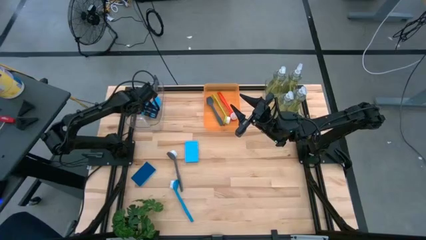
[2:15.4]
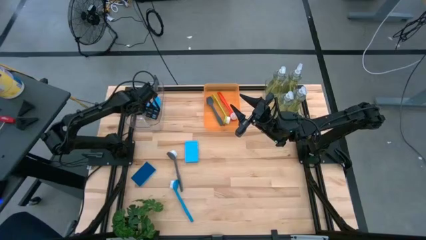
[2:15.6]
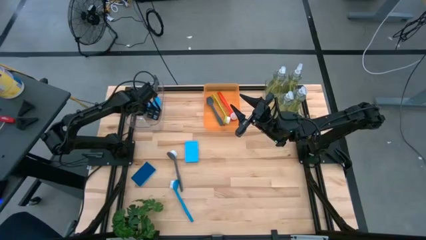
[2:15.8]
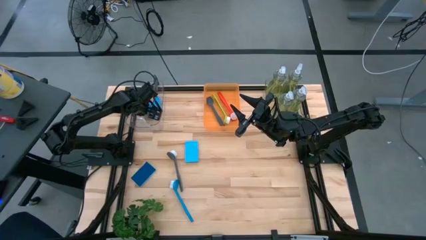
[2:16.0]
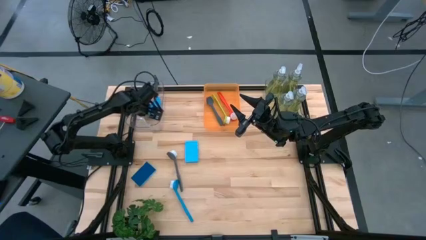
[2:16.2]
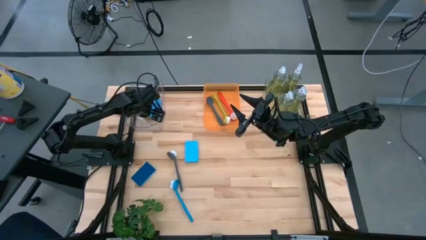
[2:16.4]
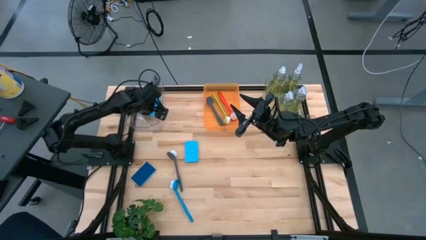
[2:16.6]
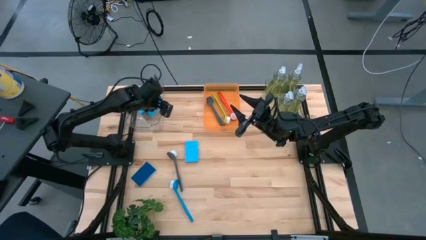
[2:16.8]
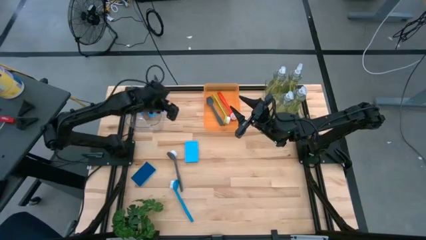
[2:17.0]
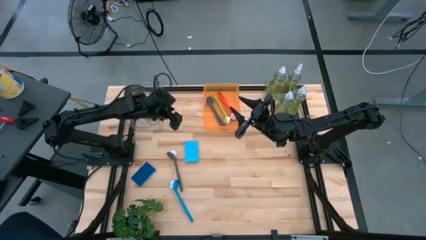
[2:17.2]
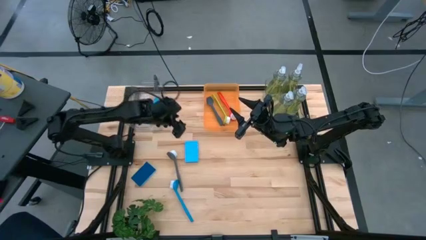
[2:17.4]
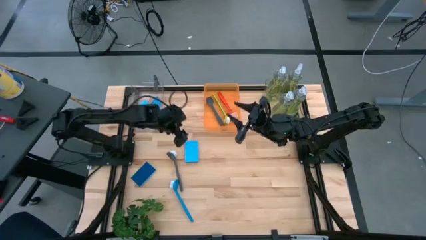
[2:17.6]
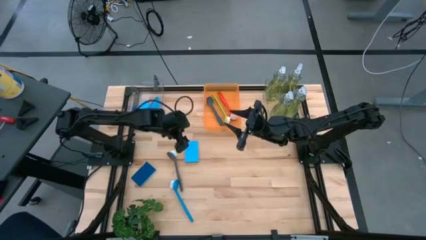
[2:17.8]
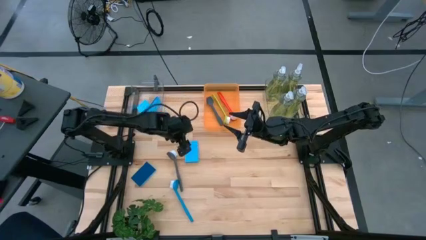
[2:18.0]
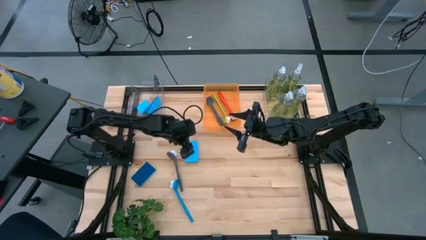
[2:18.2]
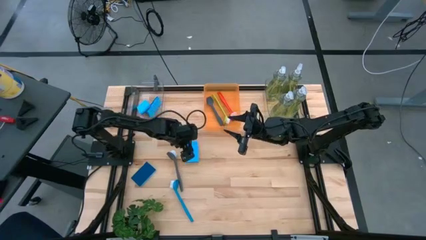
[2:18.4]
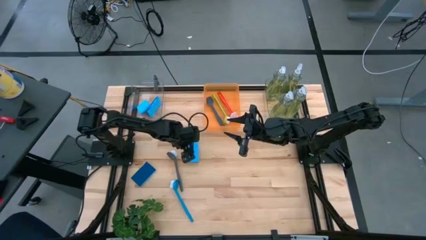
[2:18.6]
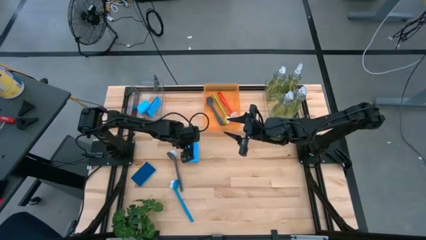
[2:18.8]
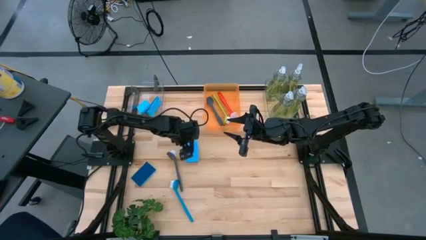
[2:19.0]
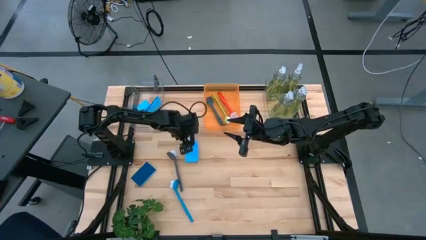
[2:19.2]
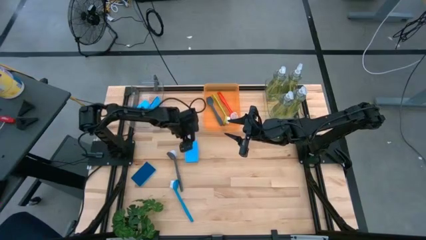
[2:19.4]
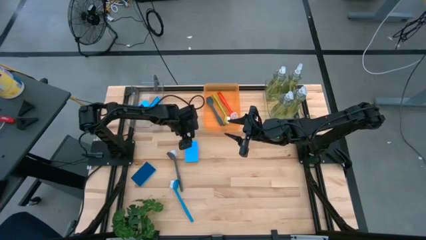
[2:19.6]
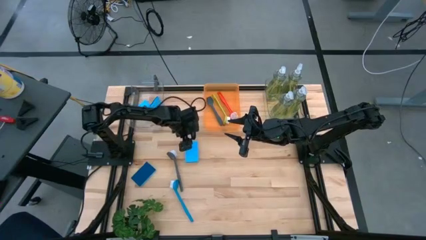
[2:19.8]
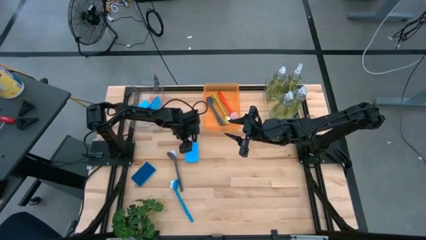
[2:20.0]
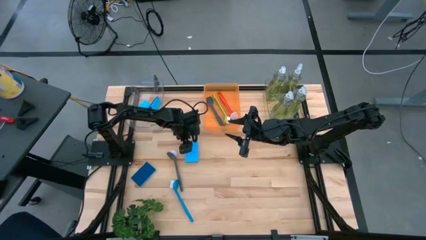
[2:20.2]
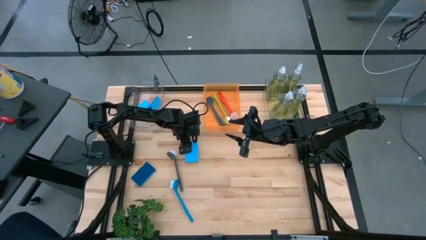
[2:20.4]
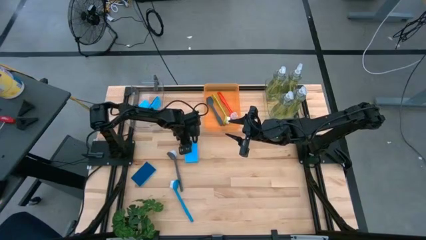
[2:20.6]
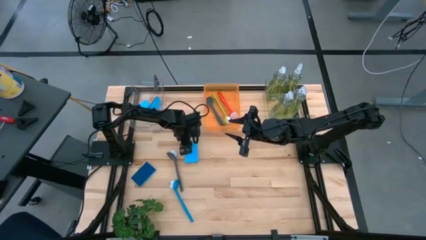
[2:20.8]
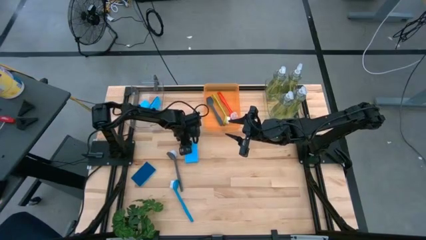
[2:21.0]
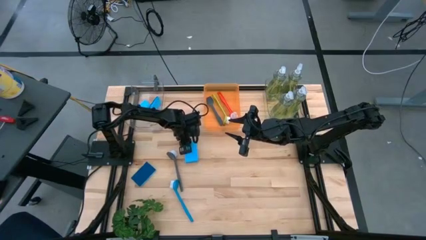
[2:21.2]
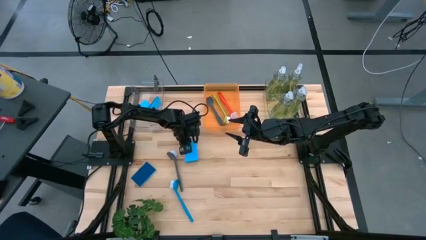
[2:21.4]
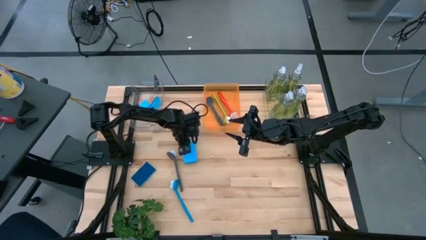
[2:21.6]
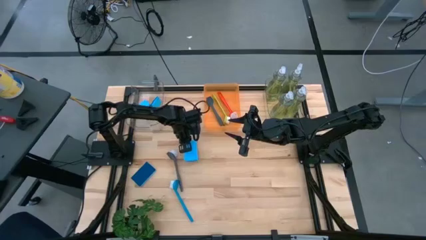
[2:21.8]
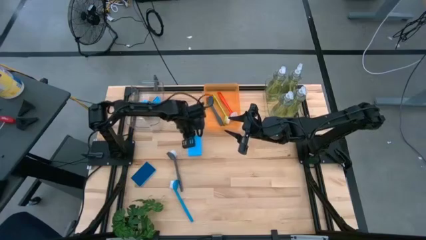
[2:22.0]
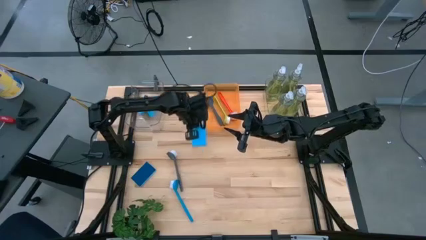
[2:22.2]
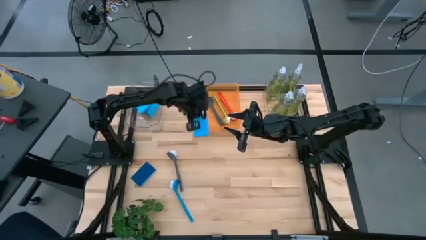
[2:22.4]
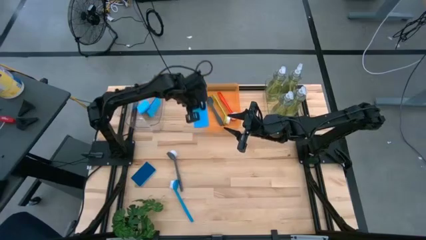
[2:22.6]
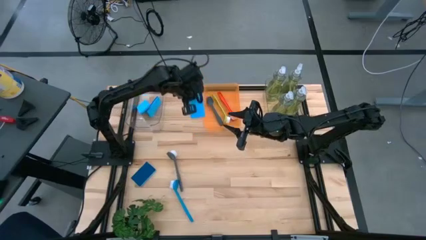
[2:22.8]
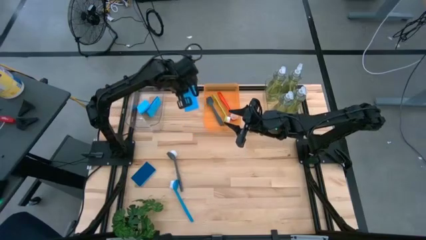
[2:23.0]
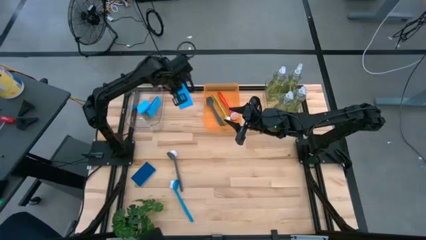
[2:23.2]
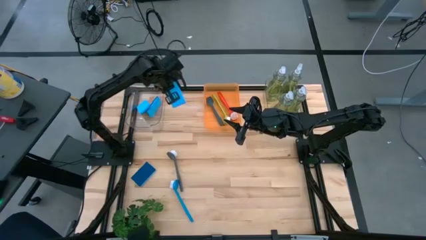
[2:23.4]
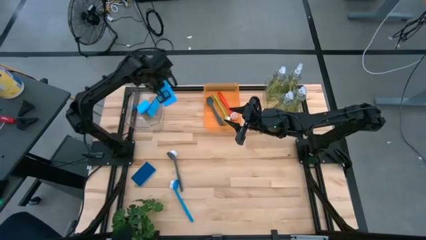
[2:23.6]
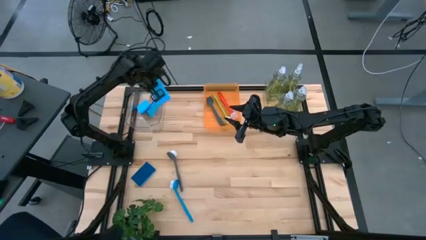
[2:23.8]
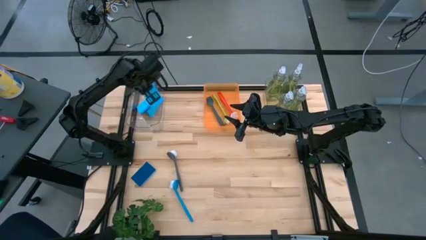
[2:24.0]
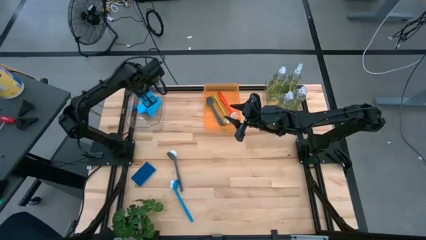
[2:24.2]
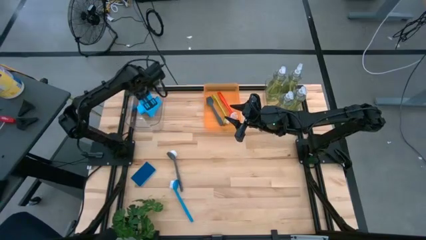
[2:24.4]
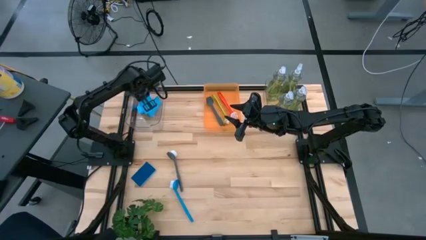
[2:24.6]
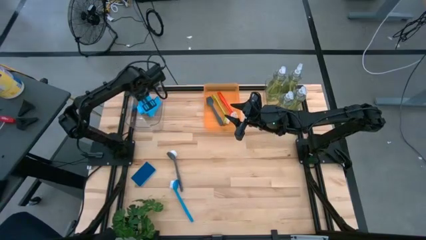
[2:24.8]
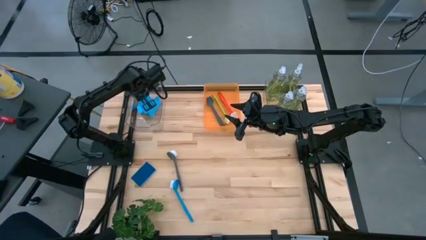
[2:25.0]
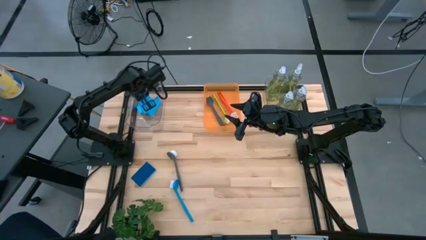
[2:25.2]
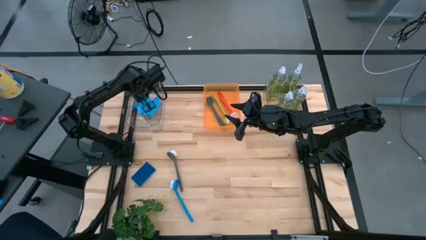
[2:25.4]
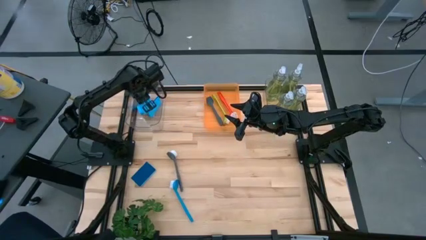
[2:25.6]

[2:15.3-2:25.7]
Task: Pick & Place Kitchen Sink Supplies
Put the blue sponge into the left transparent bin

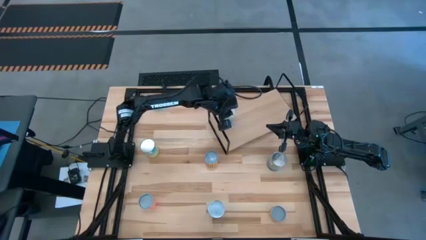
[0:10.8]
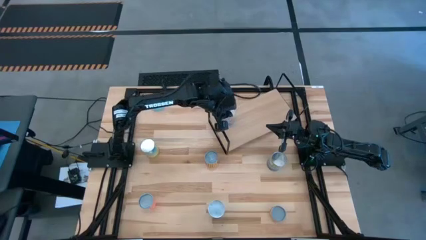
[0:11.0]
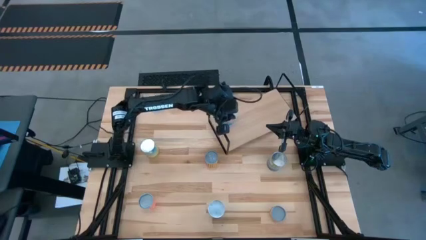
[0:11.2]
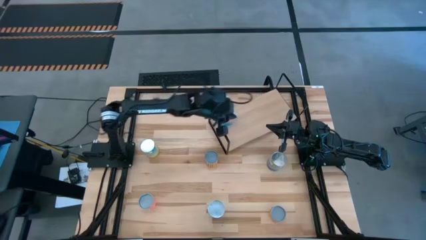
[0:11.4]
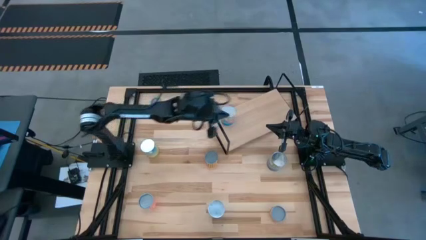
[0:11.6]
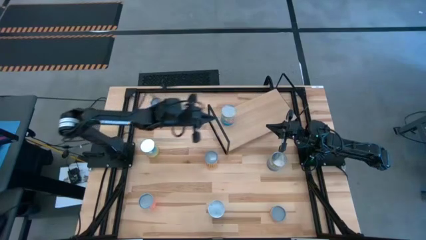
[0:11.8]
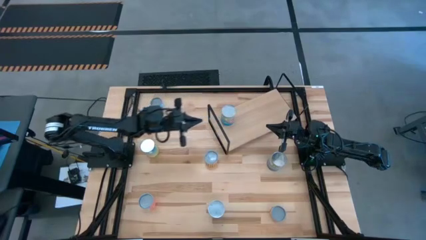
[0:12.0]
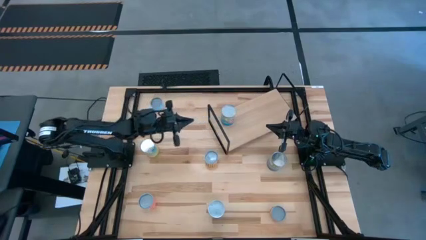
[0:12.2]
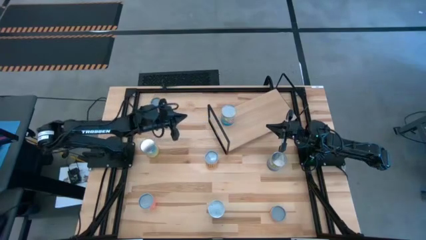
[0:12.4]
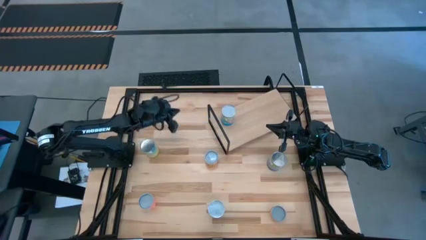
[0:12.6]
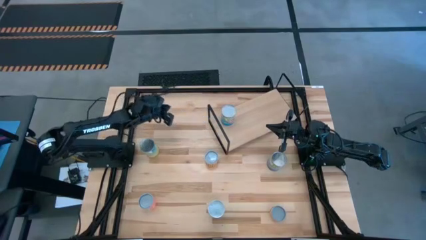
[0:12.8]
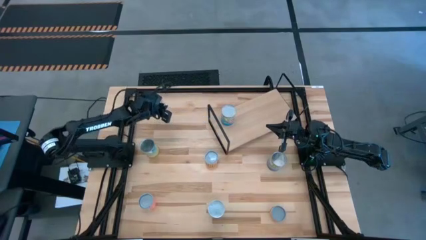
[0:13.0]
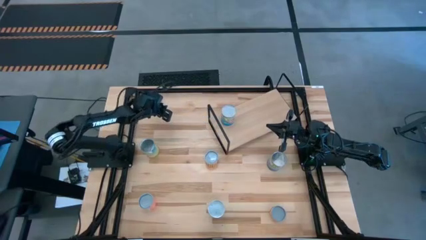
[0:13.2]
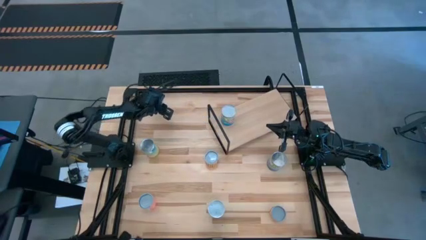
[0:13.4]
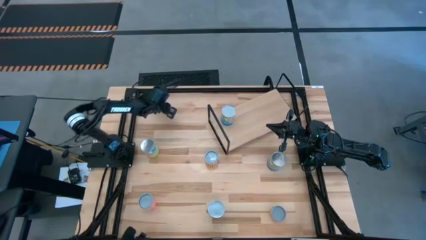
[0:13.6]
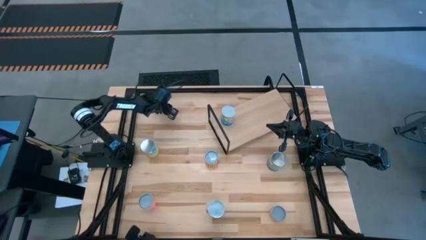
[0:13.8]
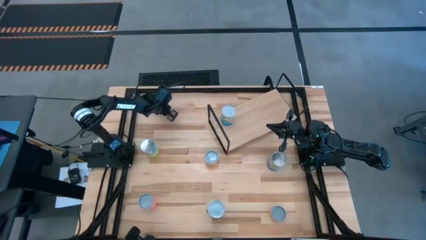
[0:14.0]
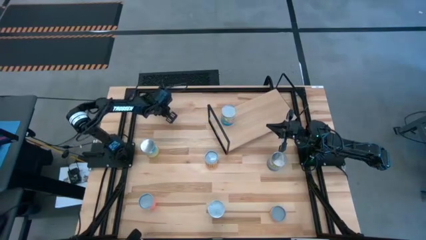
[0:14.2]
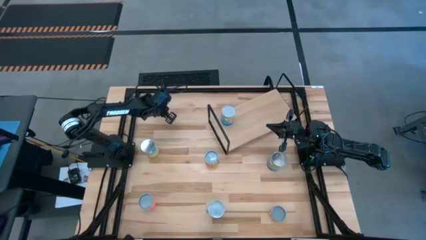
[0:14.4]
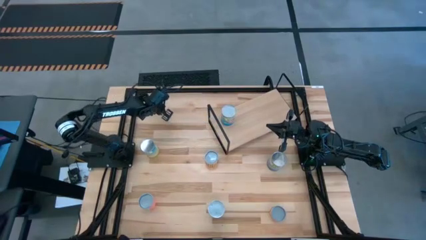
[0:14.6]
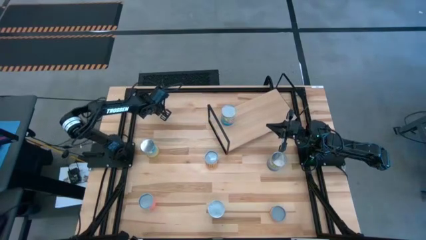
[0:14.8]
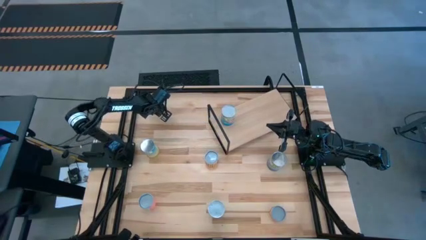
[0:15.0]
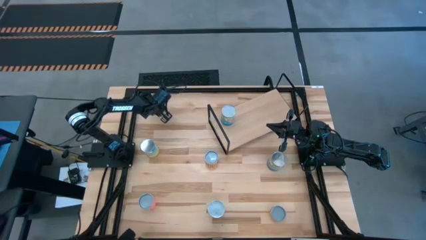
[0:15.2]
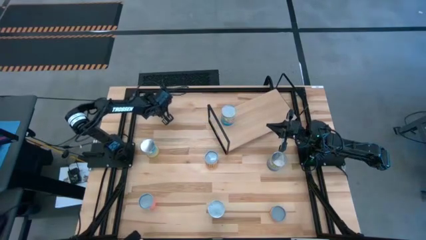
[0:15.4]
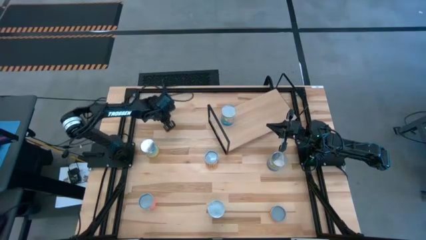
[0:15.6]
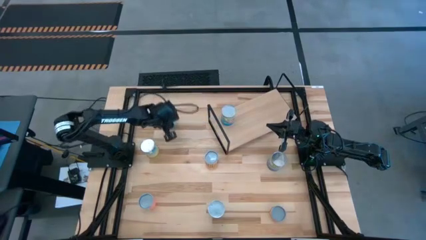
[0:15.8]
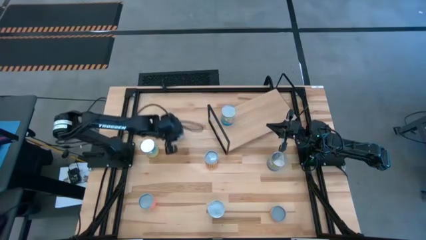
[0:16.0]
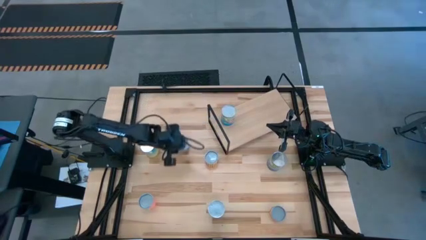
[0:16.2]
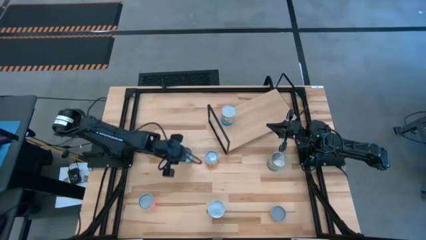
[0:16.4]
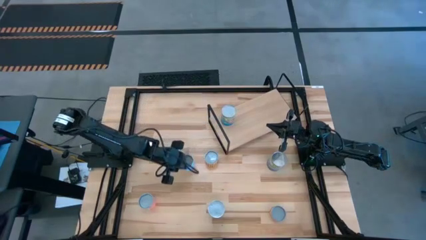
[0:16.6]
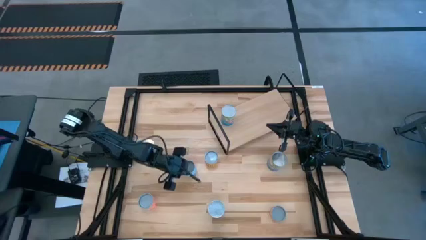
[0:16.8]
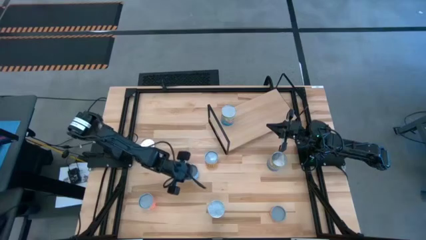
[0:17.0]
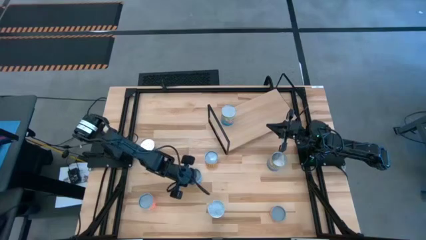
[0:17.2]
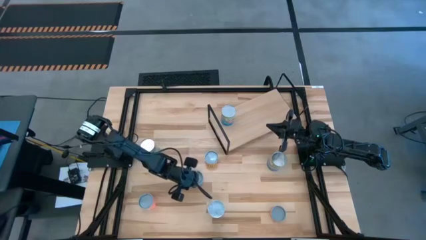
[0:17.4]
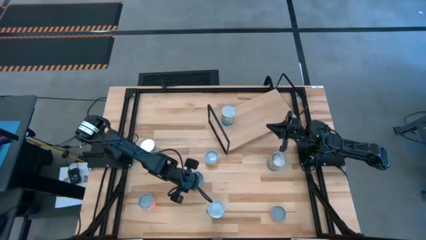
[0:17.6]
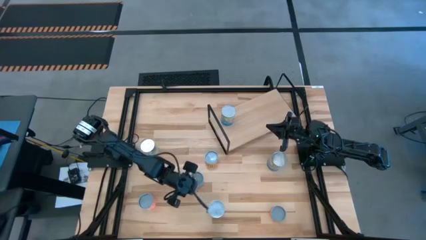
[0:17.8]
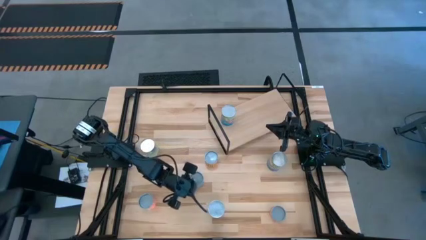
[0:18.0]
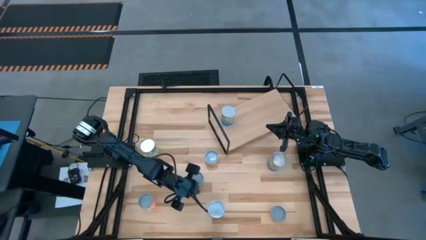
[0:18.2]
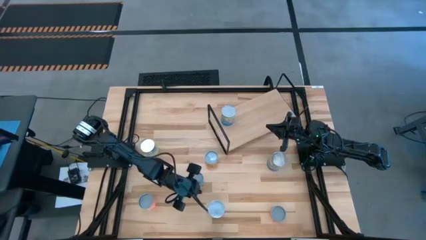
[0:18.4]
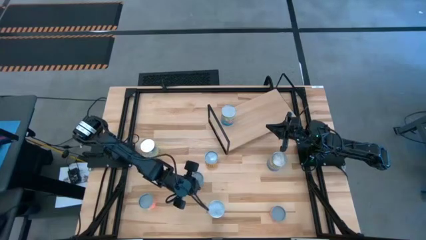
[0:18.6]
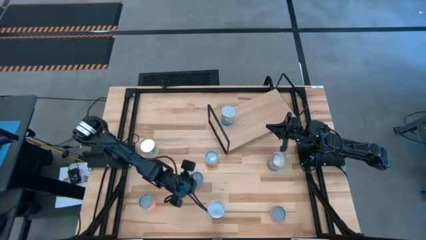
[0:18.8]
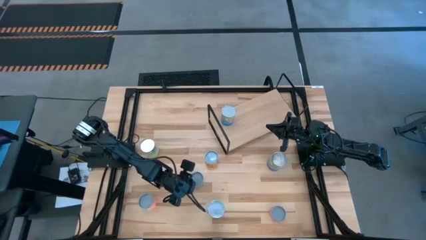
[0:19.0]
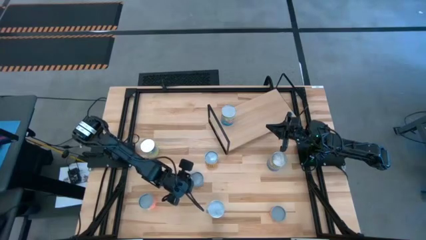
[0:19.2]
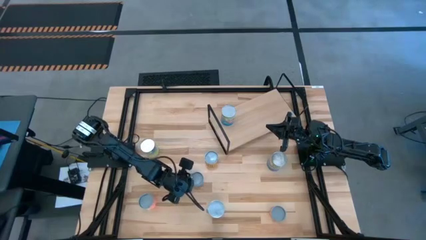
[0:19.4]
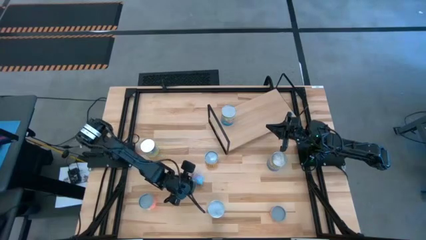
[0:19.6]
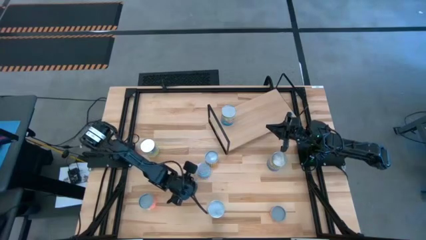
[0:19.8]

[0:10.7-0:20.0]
Task: Pick and place cans onto a shelf
Put the canned salmon onto the shelf
